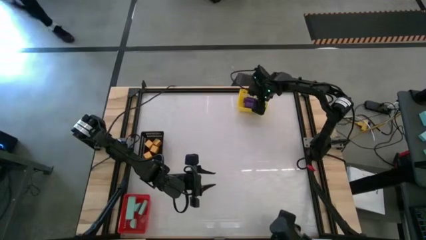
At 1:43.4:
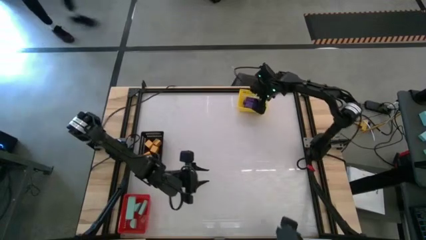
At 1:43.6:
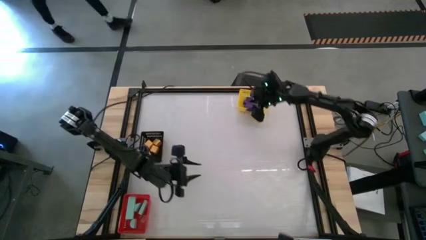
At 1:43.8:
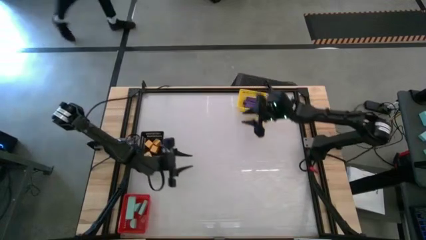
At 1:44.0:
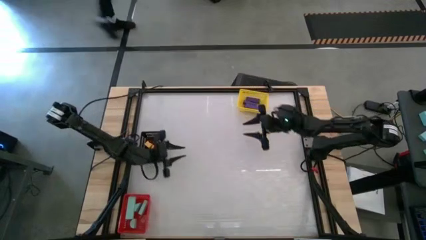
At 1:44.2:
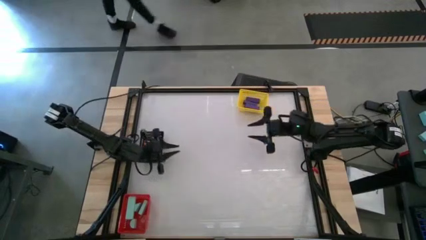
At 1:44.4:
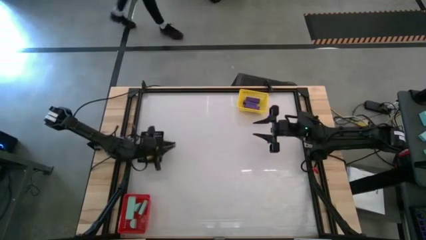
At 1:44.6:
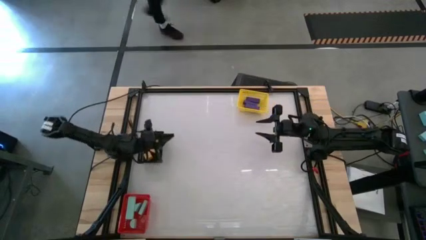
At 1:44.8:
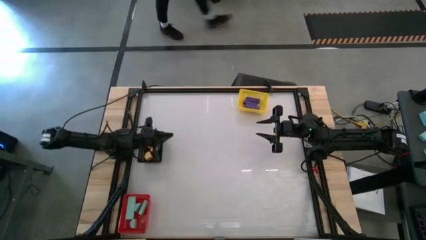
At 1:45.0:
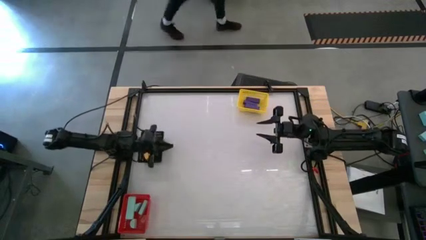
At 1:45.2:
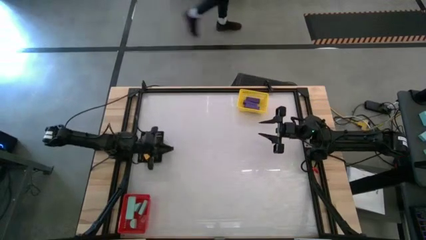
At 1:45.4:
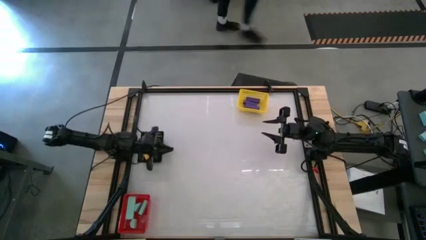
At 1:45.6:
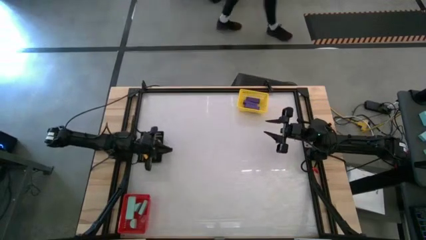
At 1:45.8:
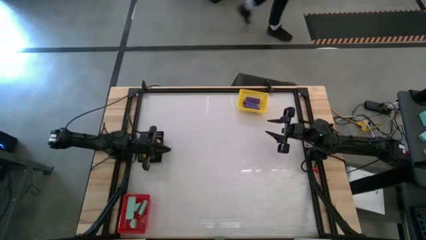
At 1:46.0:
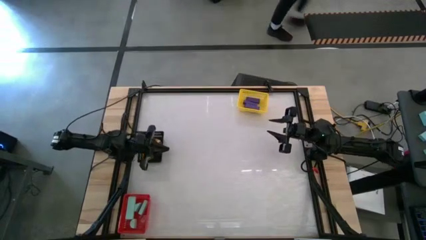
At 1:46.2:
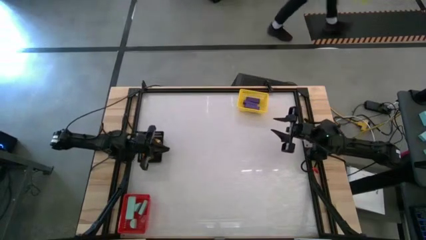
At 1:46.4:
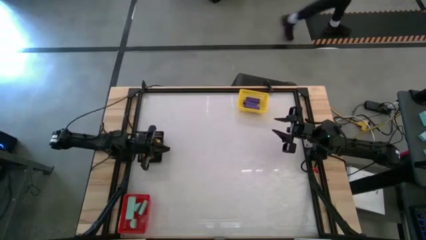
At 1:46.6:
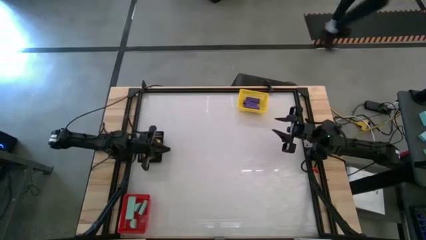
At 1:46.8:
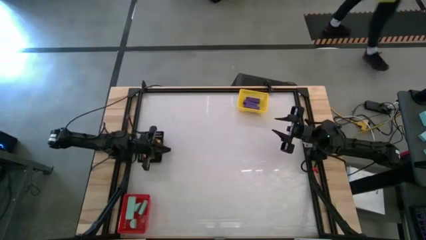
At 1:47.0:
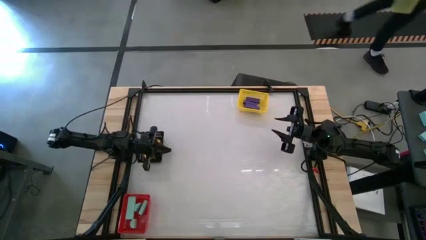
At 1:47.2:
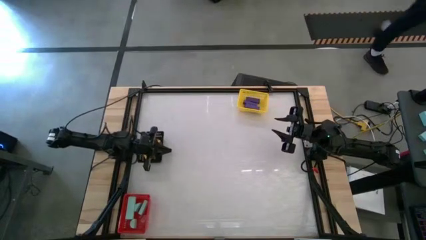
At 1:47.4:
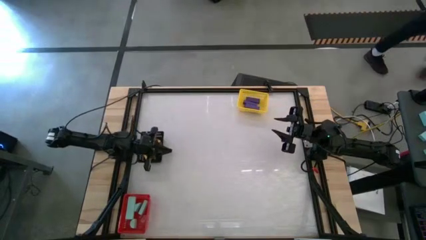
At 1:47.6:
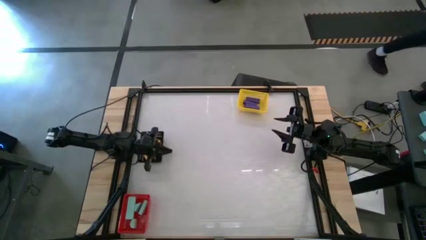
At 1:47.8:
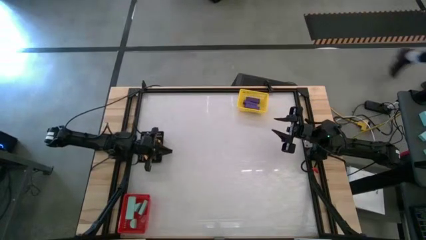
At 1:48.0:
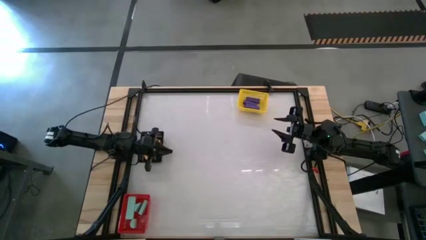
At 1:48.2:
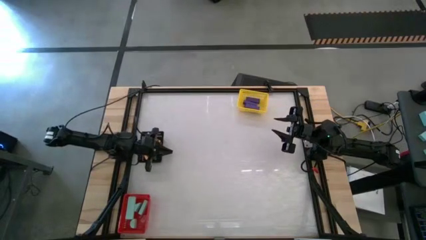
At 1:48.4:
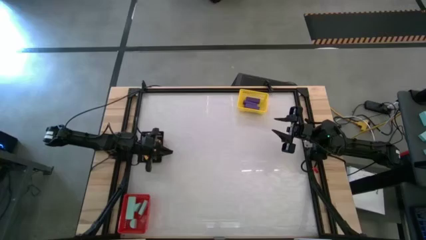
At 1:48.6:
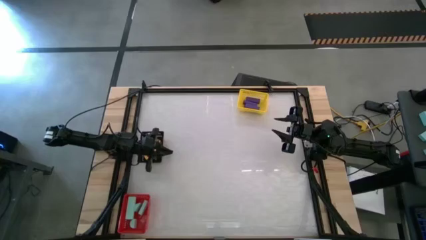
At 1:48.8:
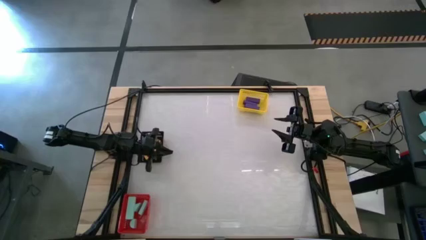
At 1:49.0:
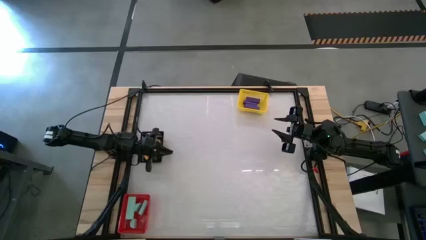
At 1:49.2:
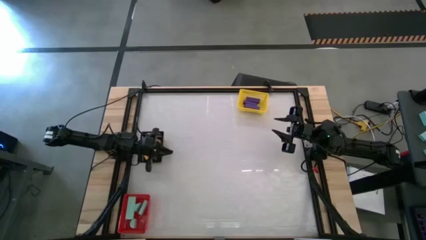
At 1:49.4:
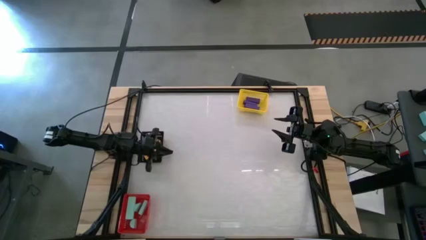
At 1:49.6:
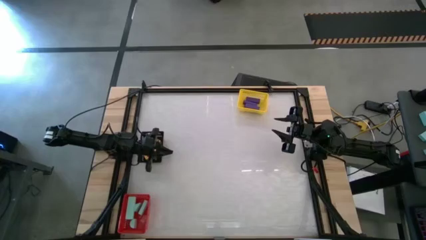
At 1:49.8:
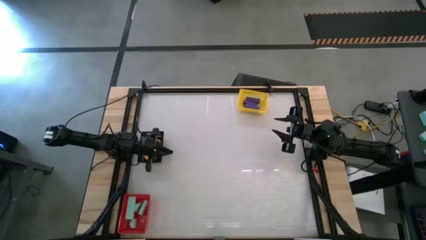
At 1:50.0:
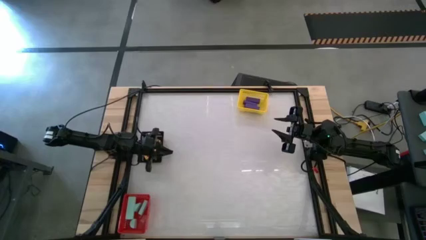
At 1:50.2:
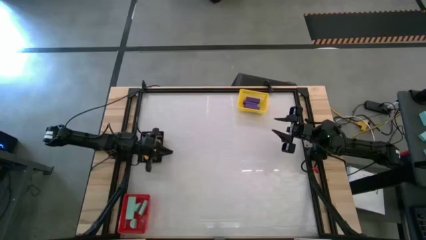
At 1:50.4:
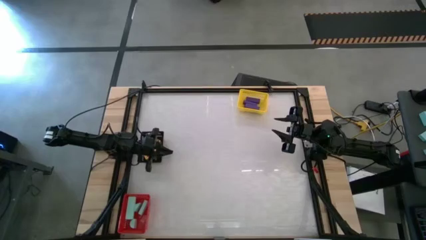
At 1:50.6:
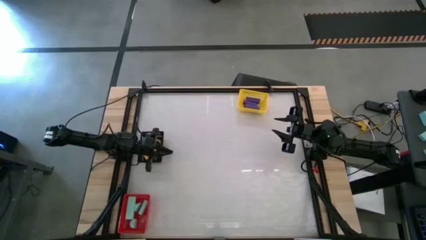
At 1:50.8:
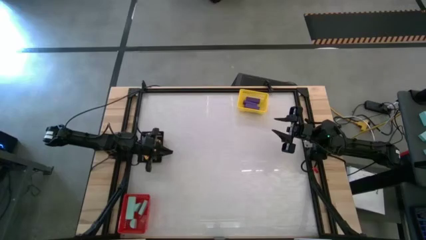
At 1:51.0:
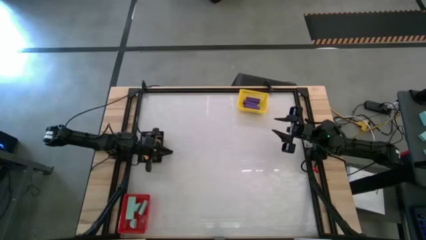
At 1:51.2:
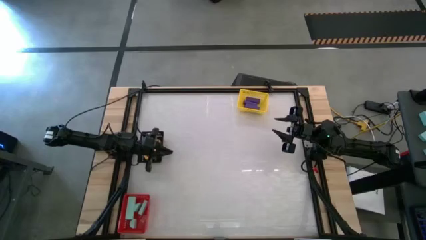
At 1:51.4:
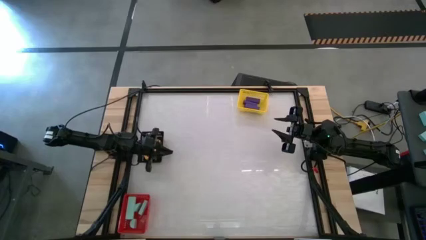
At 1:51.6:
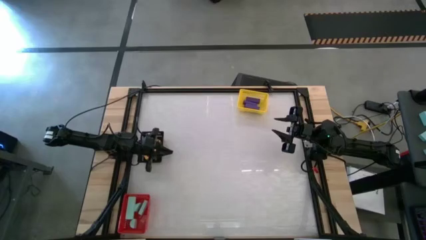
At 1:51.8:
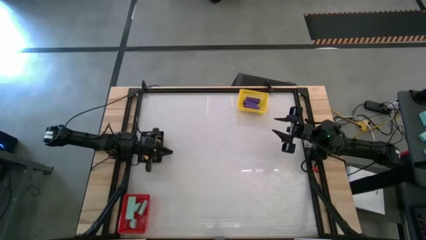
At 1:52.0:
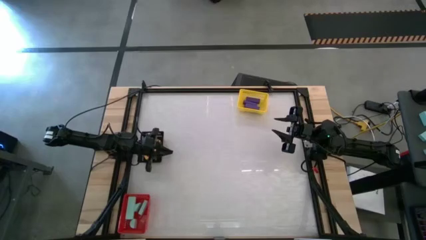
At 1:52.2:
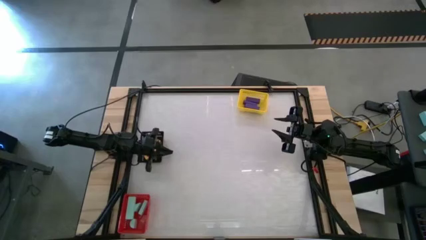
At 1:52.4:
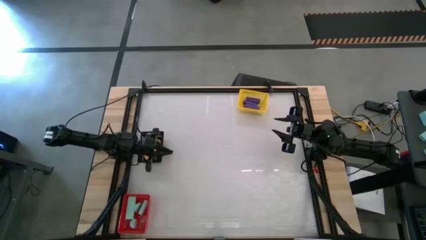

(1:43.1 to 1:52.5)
Task: Sort & place blocks by color
Return to Home Position
